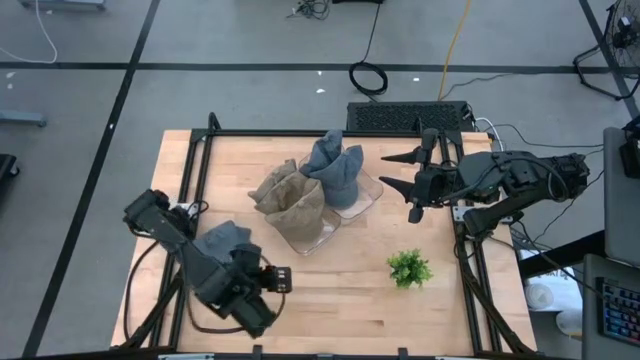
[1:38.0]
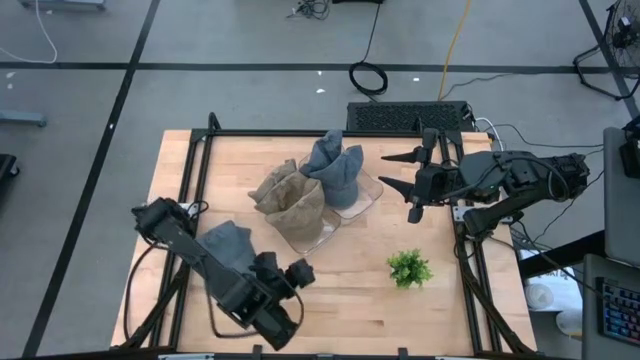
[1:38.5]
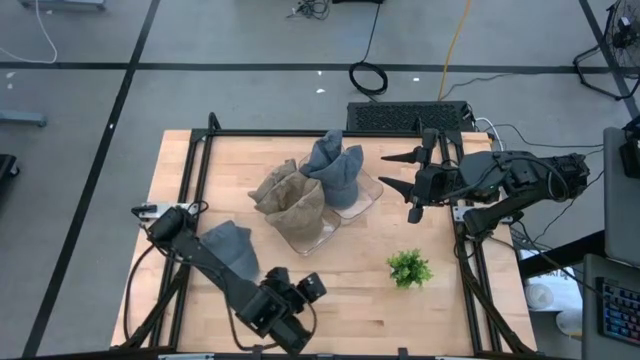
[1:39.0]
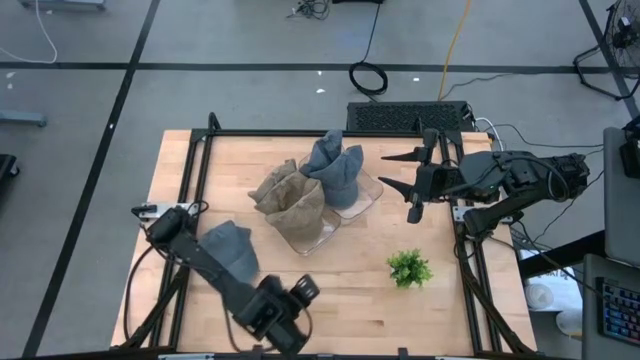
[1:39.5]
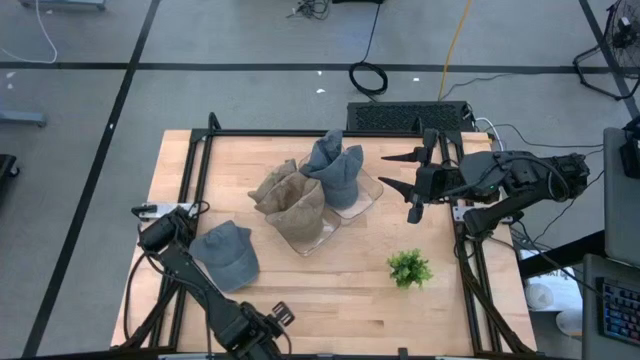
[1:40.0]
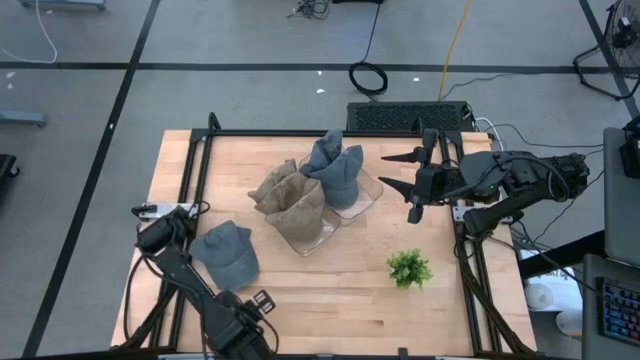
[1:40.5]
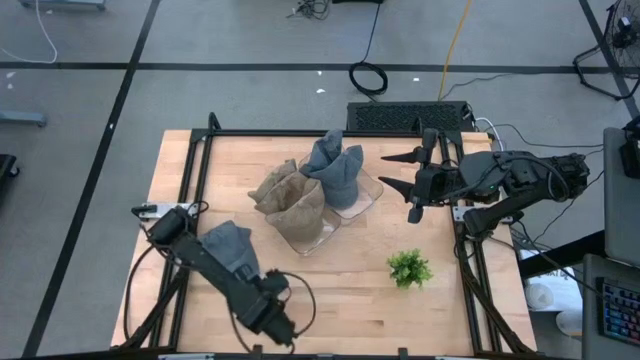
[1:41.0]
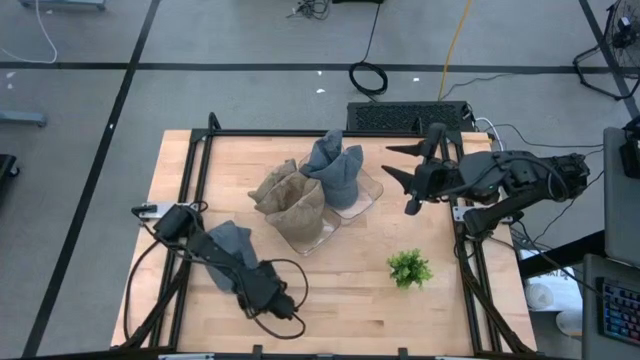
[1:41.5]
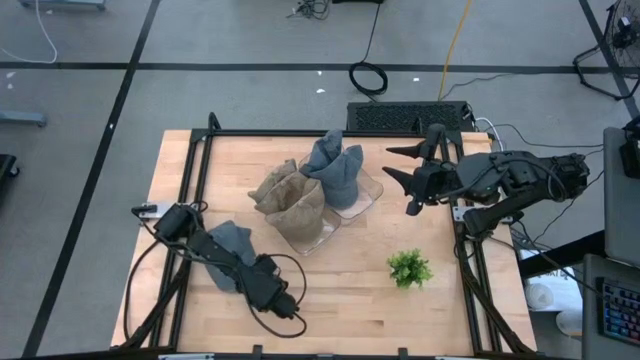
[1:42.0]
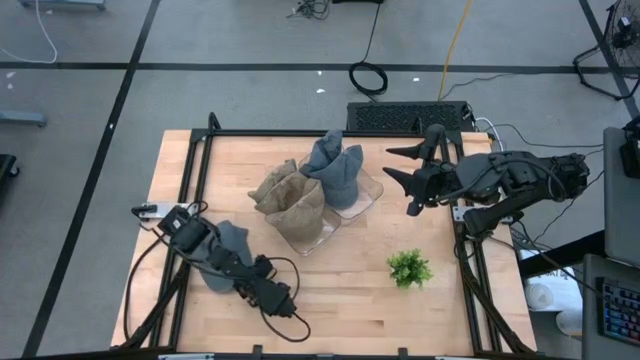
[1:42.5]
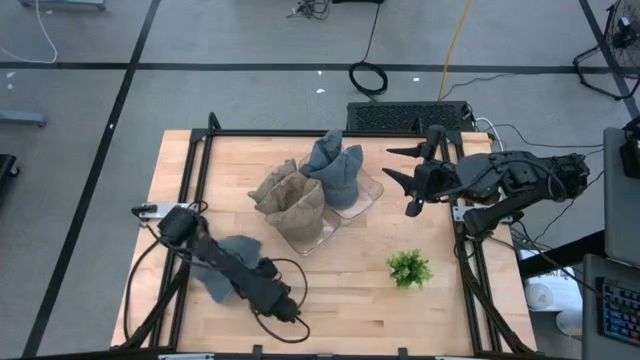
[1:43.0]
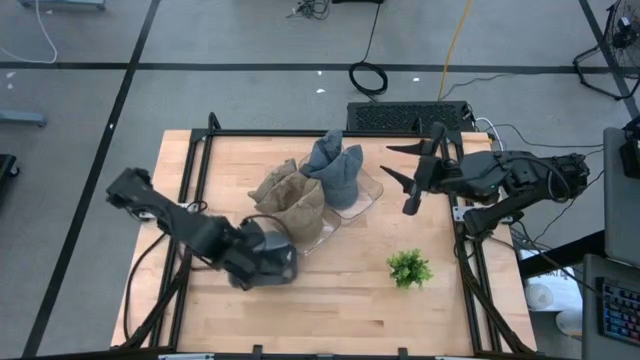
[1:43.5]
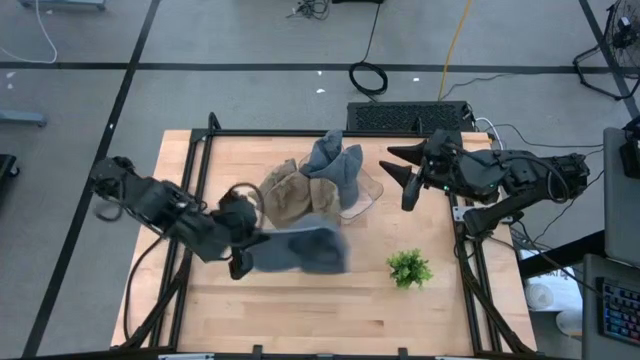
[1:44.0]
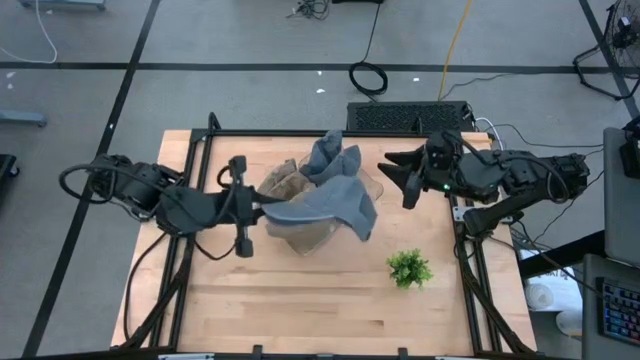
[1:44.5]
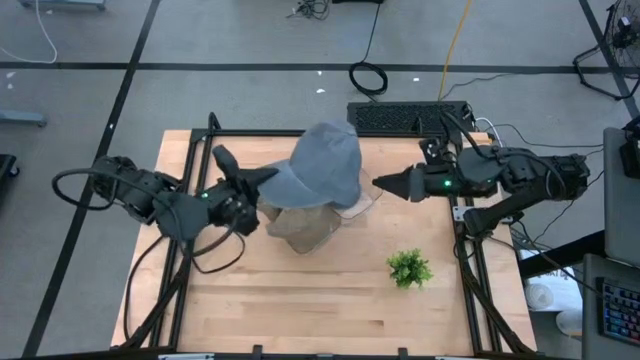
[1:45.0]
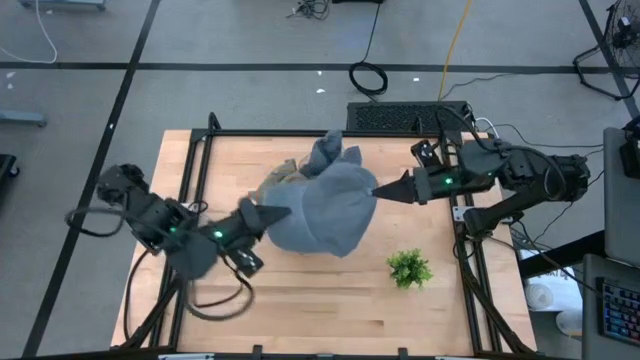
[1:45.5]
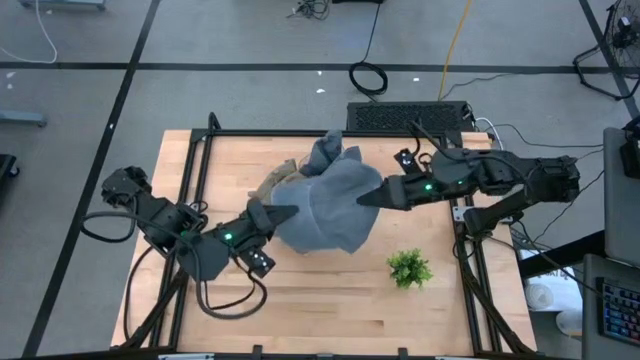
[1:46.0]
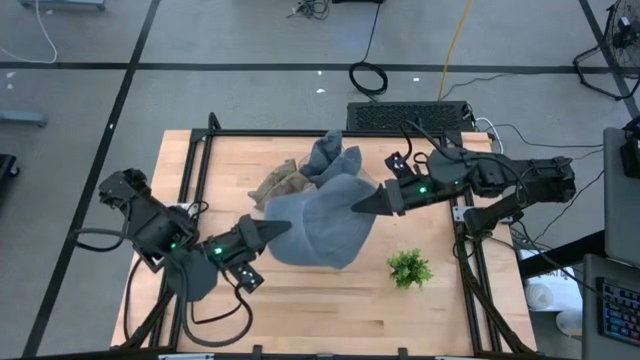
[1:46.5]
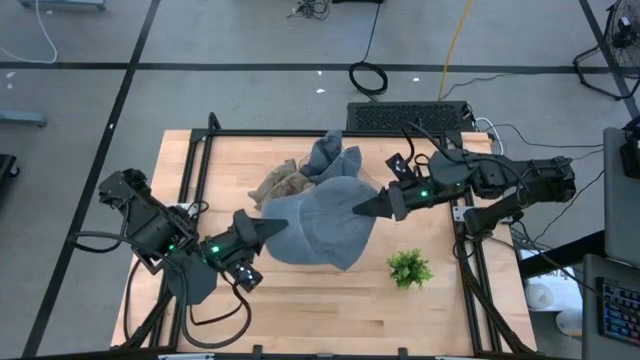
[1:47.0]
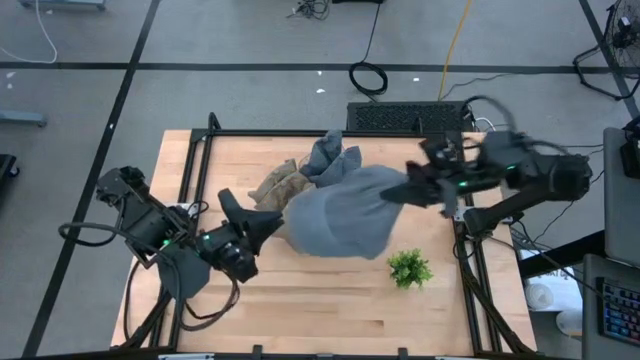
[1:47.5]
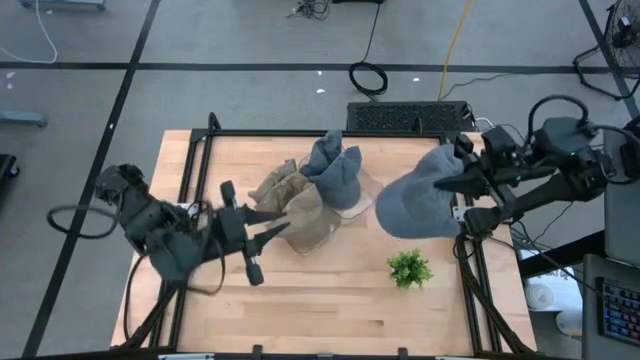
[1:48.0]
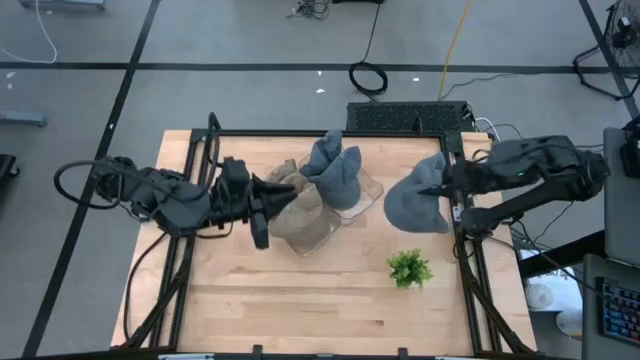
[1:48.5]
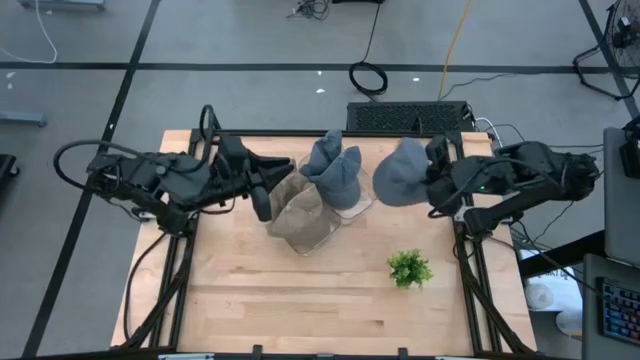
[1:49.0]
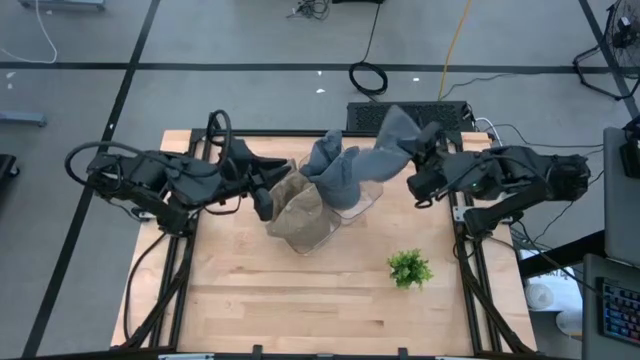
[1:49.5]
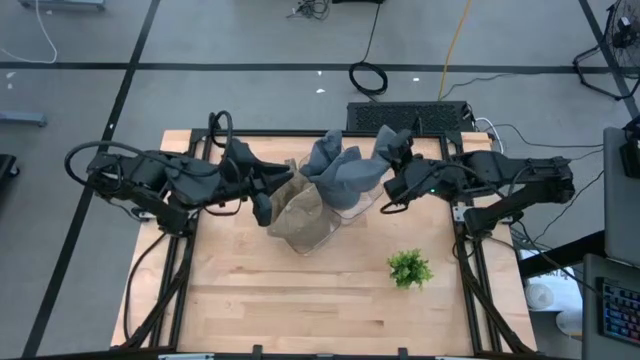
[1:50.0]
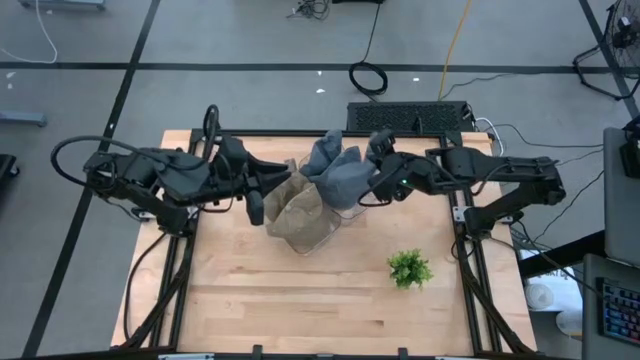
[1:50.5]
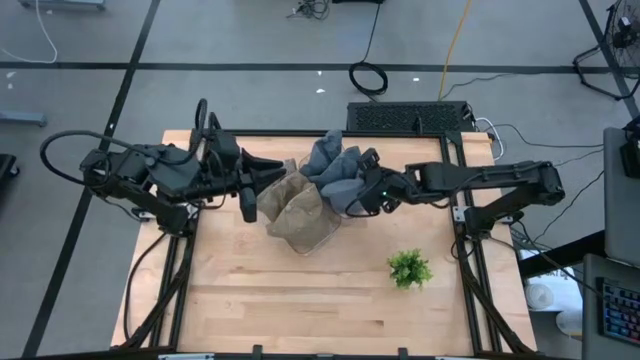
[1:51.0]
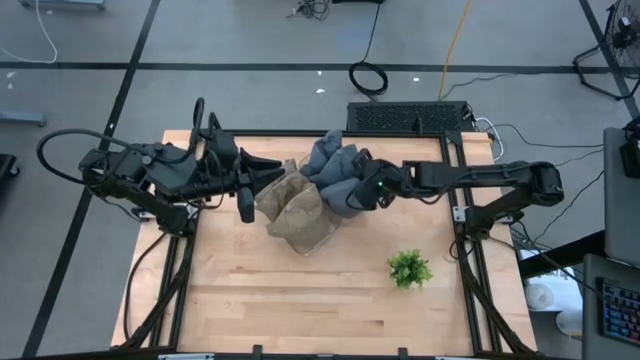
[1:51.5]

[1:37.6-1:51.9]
Task: Pick & Place hat
Put the blue cap into the right transparent bin

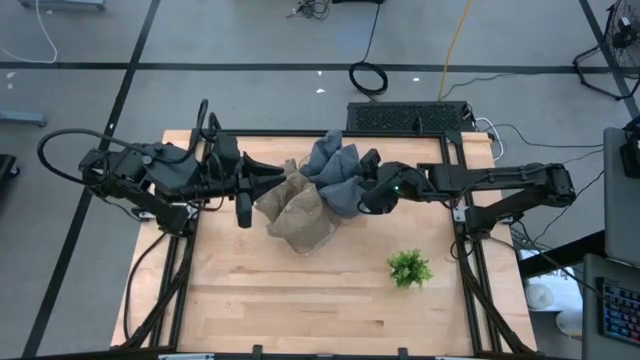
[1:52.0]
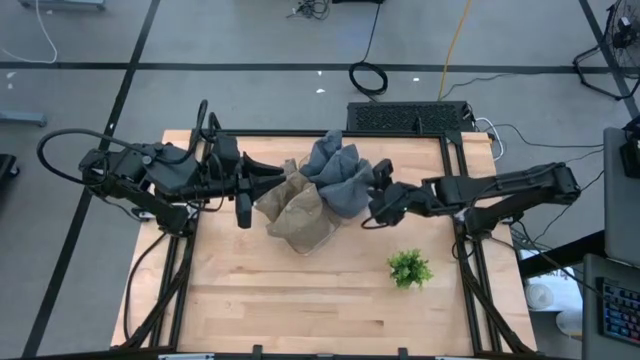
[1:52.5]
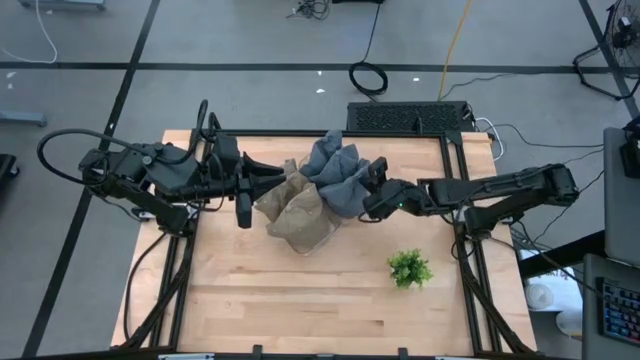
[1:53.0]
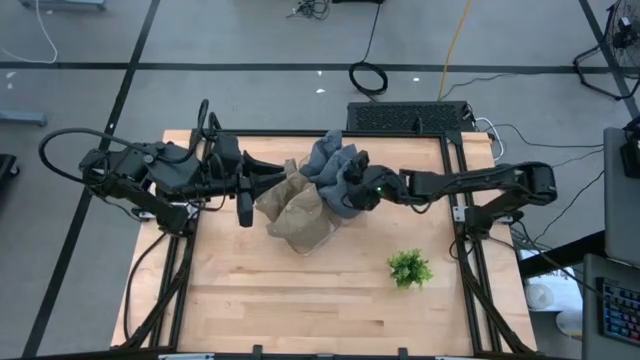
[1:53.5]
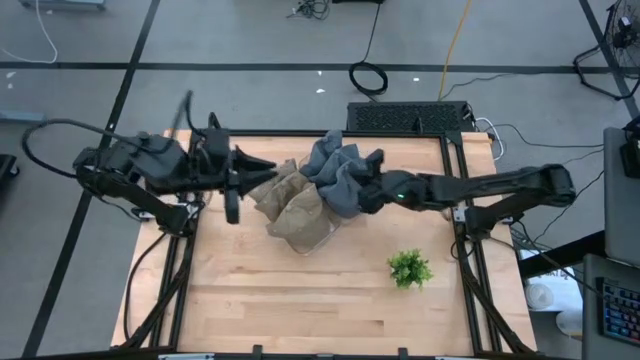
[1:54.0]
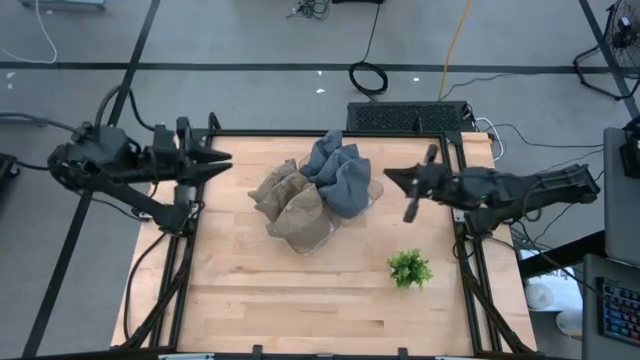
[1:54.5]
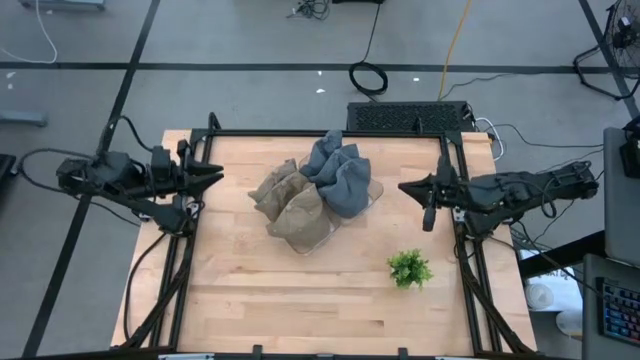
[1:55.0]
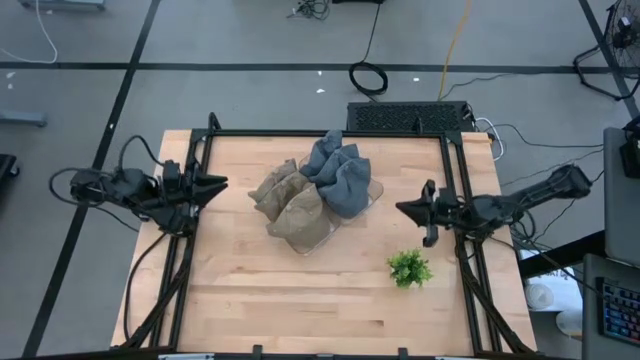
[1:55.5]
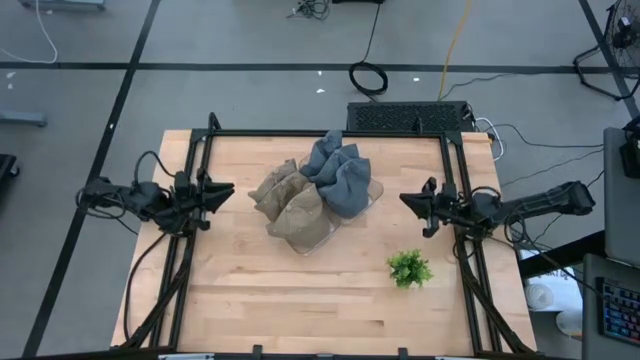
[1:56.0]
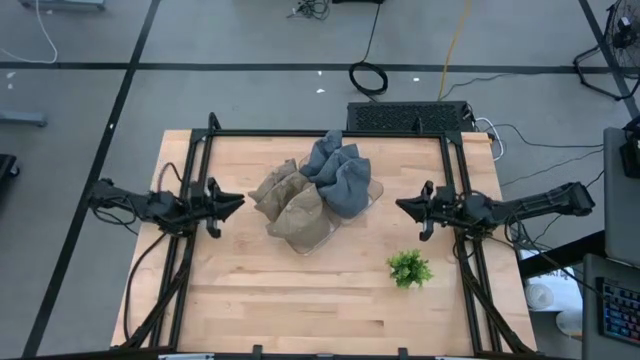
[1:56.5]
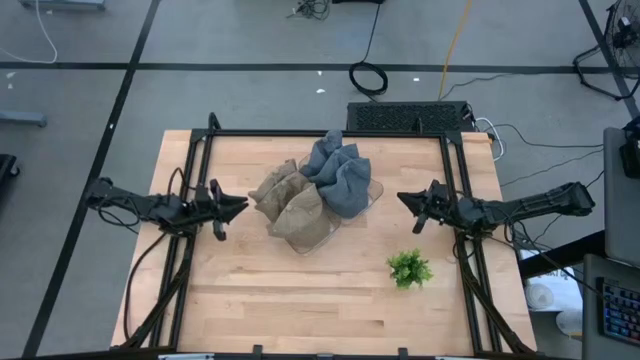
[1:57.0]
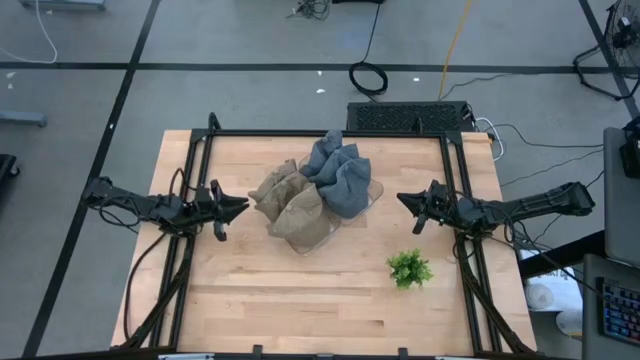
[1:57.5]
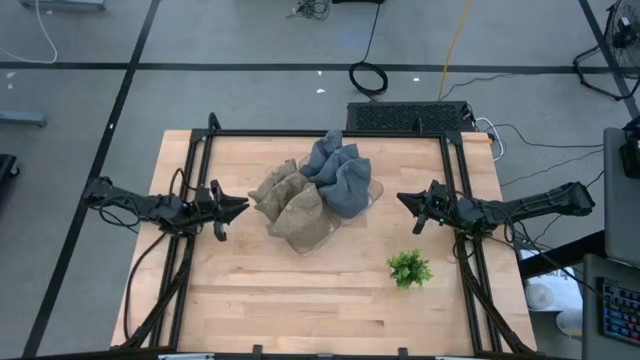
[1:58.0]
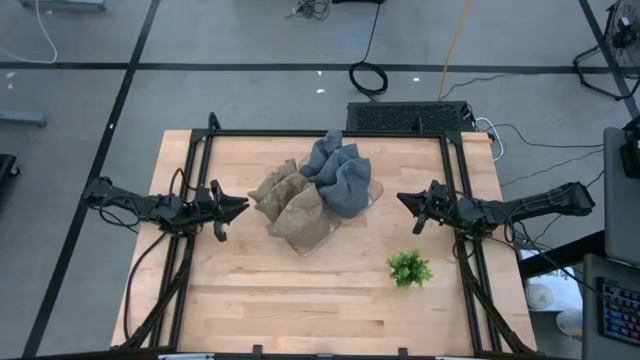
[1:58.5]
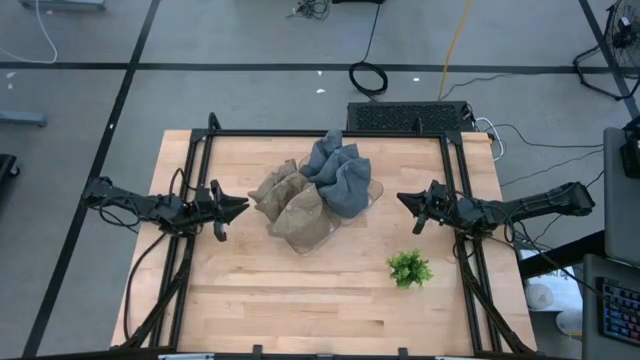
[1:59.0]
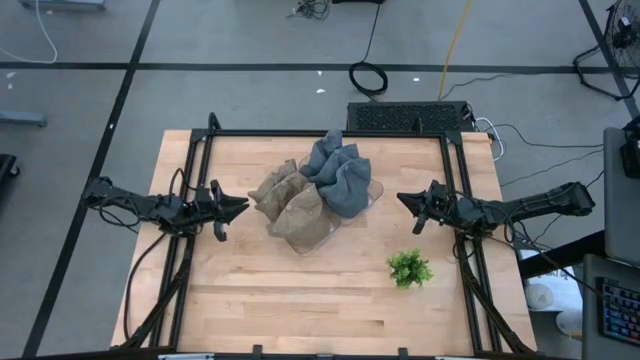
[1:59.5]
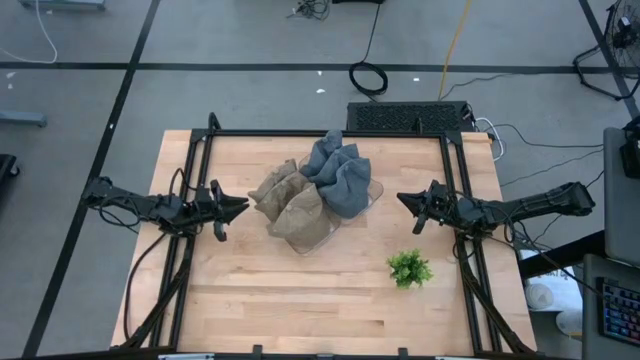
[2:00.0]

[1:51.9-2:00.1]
Return to Home Position
